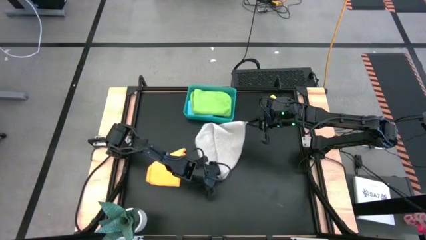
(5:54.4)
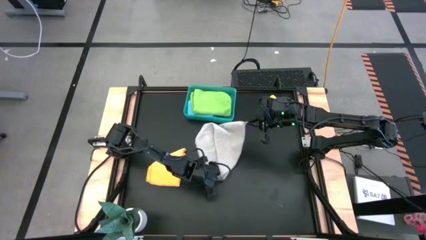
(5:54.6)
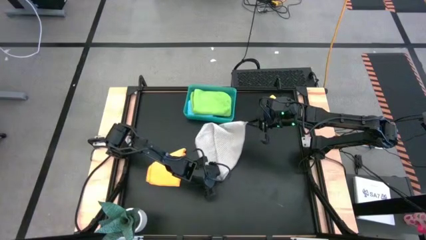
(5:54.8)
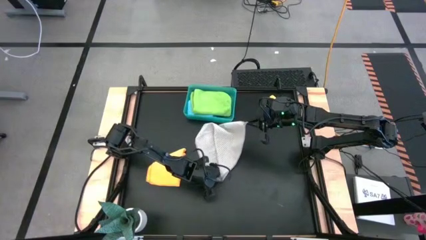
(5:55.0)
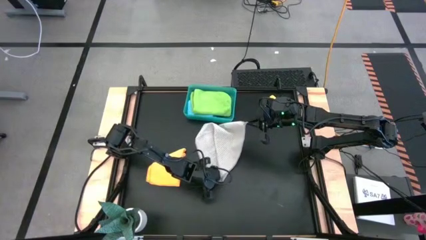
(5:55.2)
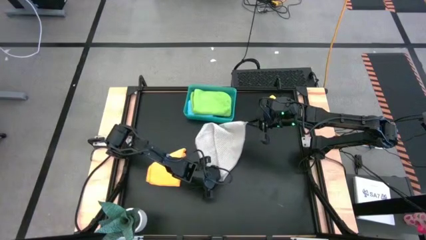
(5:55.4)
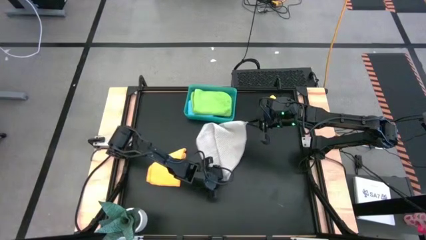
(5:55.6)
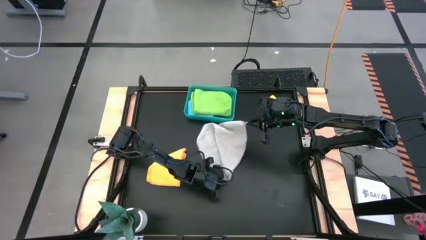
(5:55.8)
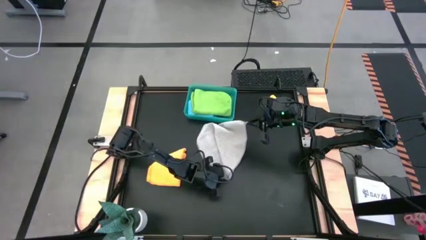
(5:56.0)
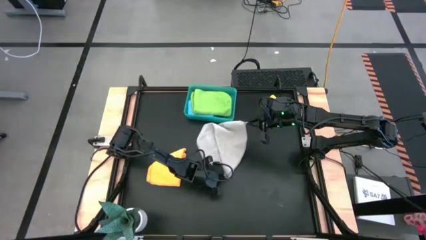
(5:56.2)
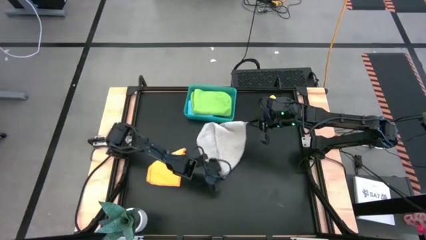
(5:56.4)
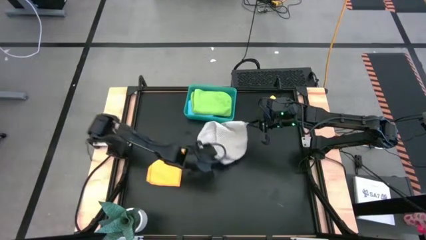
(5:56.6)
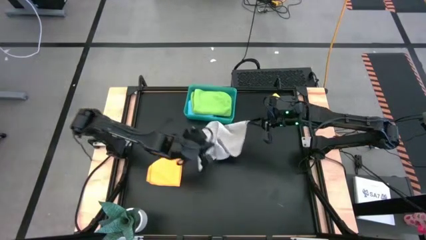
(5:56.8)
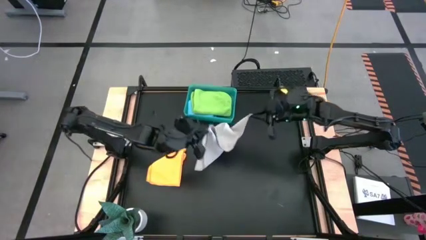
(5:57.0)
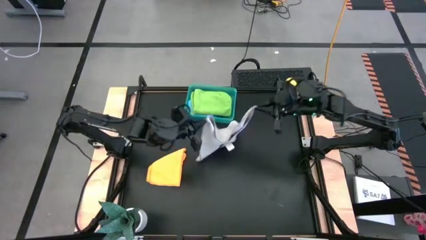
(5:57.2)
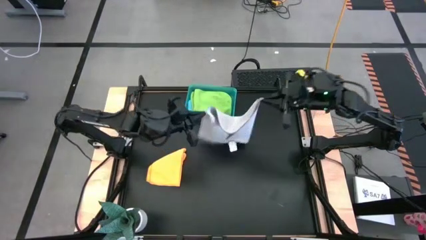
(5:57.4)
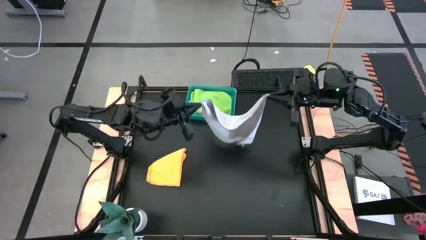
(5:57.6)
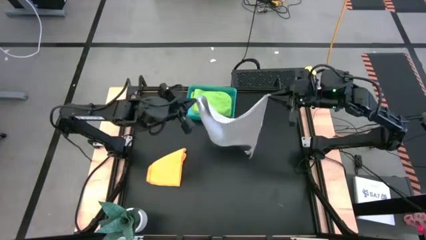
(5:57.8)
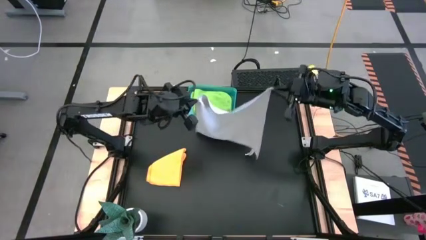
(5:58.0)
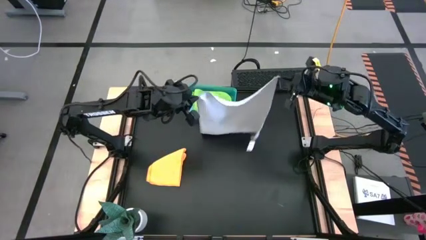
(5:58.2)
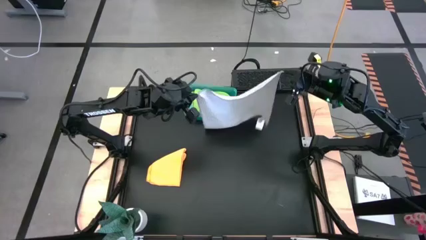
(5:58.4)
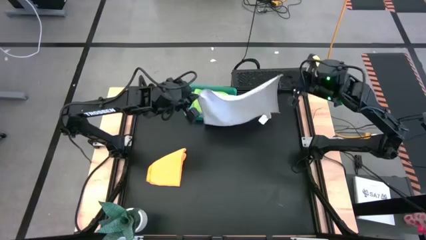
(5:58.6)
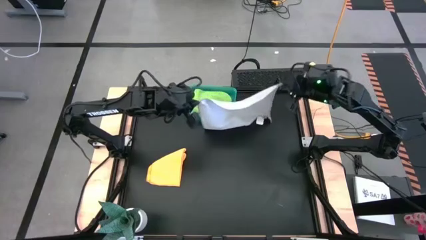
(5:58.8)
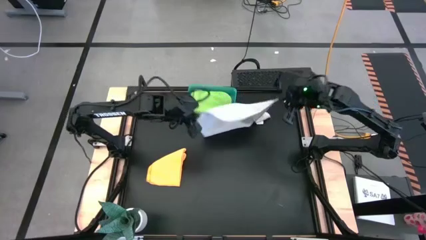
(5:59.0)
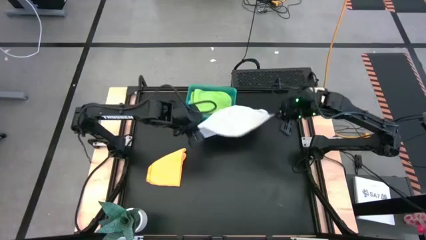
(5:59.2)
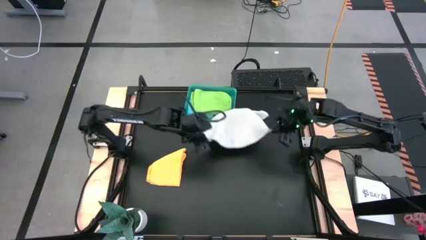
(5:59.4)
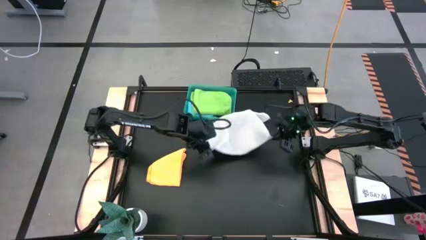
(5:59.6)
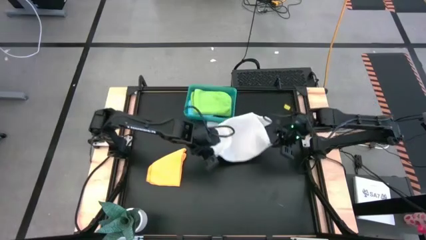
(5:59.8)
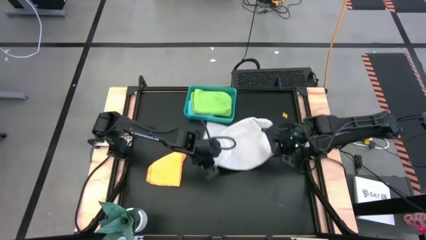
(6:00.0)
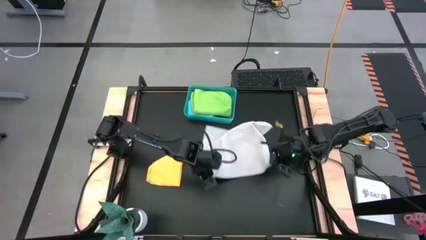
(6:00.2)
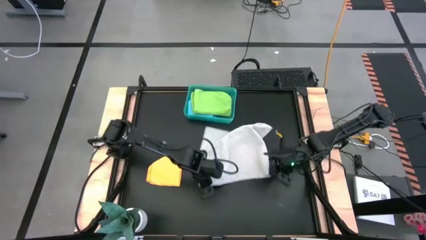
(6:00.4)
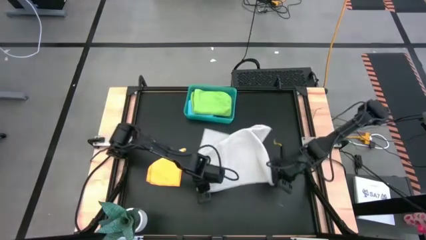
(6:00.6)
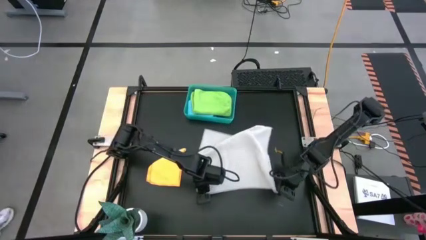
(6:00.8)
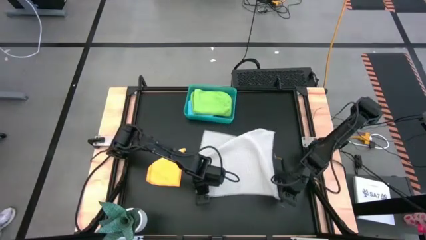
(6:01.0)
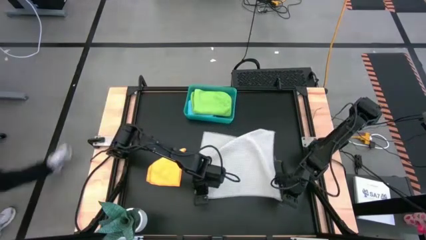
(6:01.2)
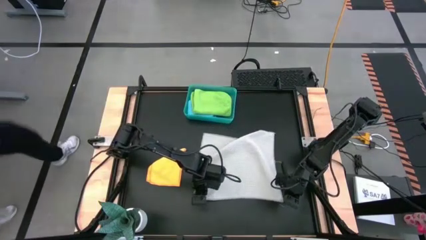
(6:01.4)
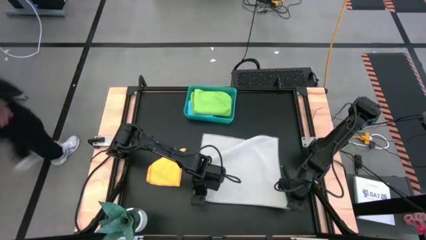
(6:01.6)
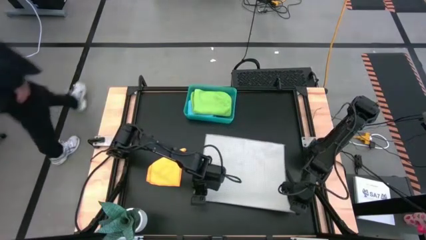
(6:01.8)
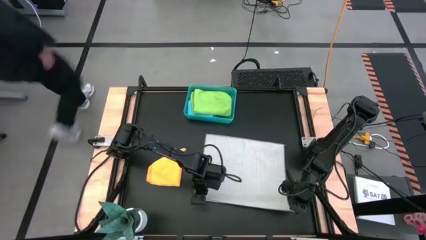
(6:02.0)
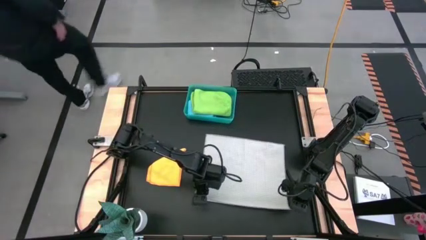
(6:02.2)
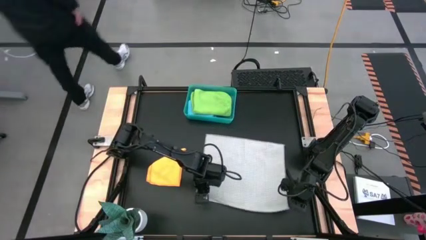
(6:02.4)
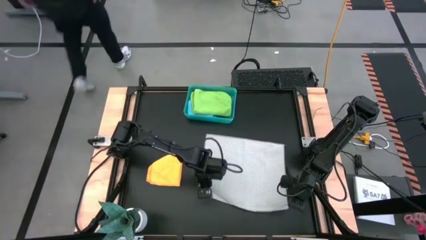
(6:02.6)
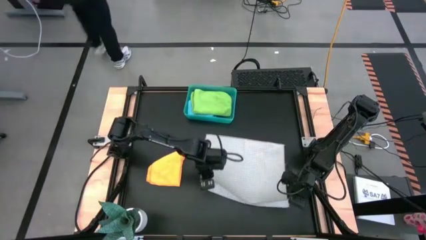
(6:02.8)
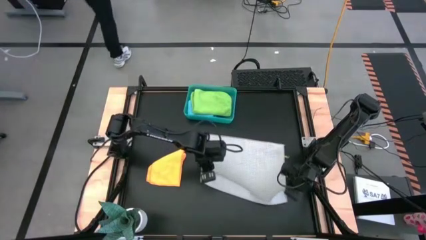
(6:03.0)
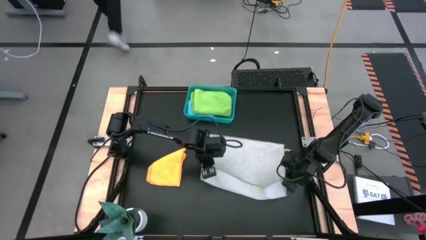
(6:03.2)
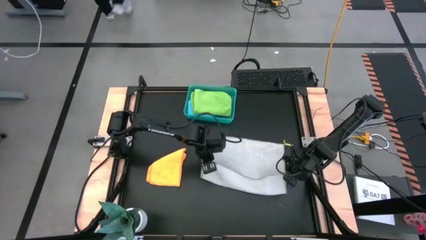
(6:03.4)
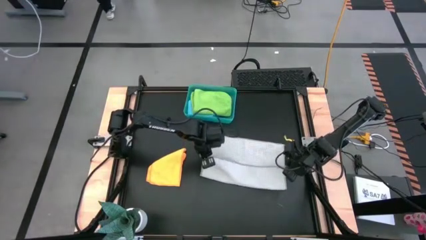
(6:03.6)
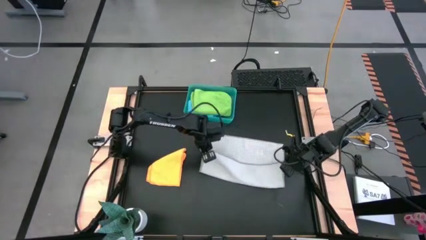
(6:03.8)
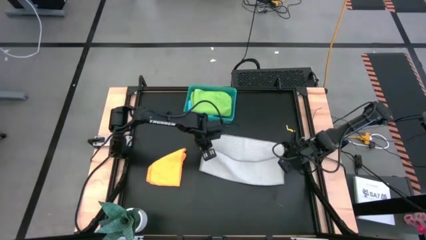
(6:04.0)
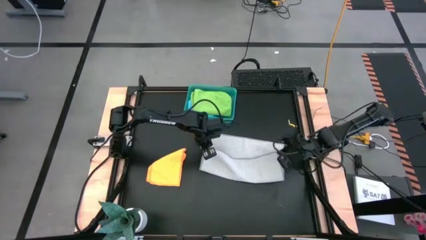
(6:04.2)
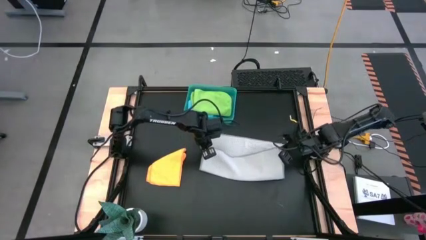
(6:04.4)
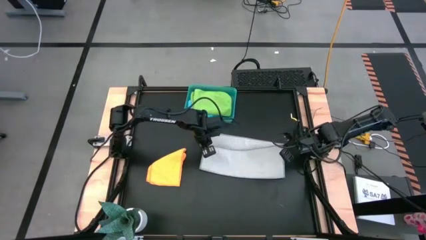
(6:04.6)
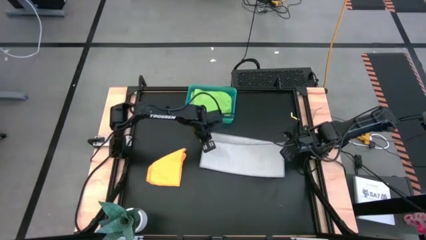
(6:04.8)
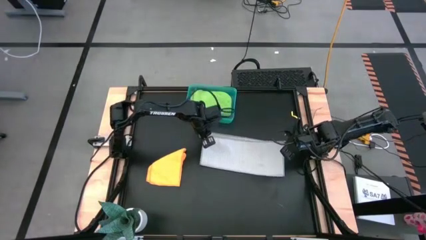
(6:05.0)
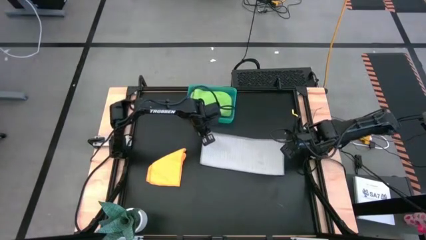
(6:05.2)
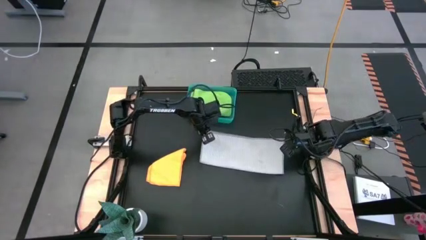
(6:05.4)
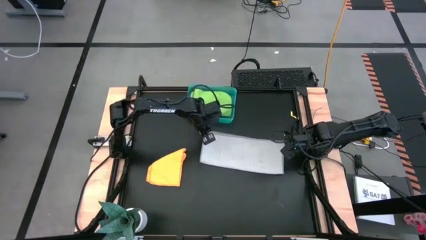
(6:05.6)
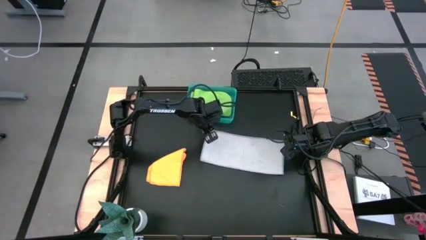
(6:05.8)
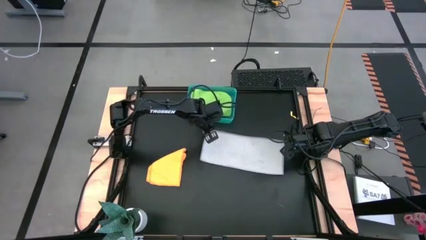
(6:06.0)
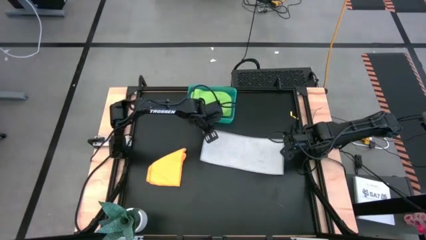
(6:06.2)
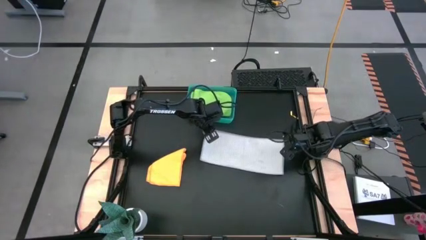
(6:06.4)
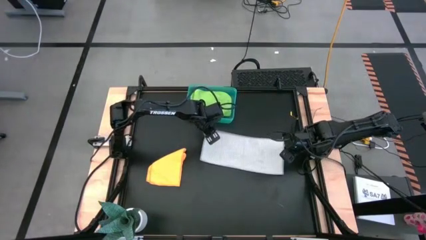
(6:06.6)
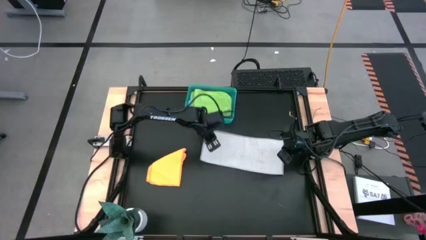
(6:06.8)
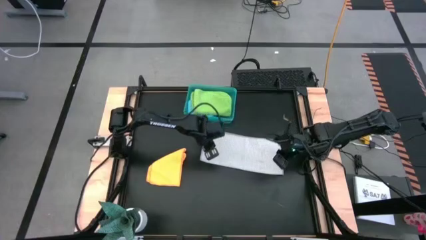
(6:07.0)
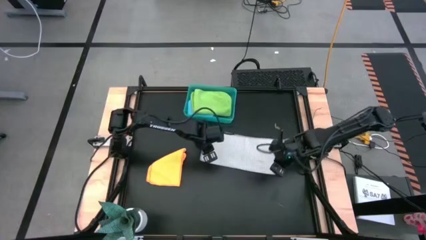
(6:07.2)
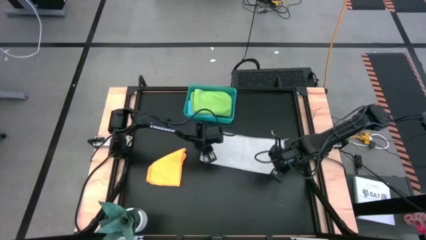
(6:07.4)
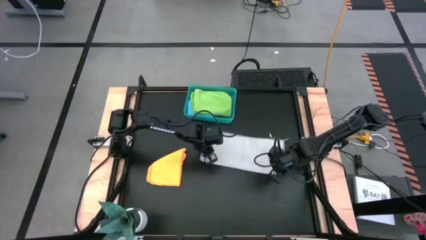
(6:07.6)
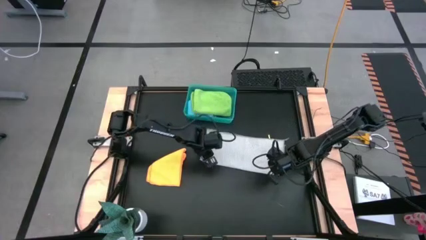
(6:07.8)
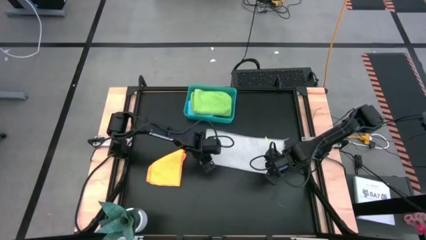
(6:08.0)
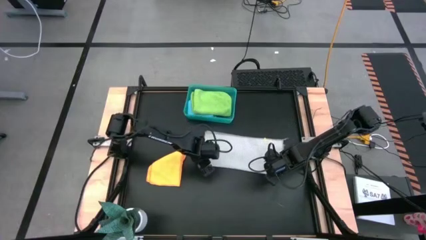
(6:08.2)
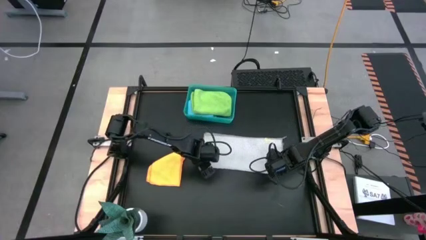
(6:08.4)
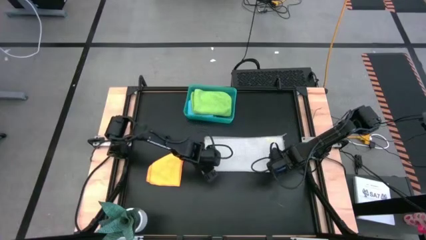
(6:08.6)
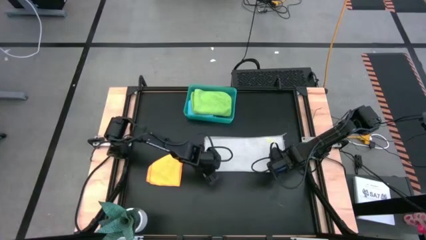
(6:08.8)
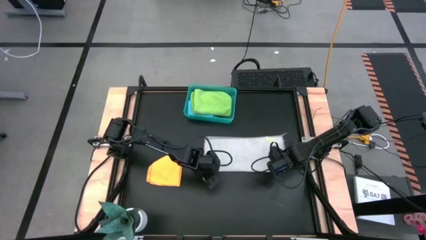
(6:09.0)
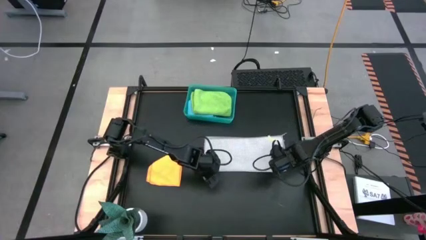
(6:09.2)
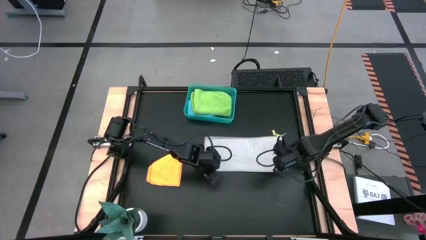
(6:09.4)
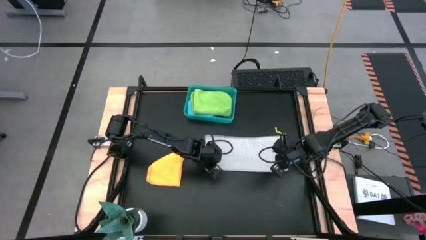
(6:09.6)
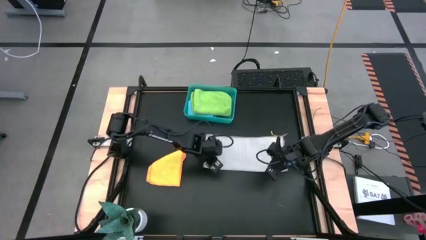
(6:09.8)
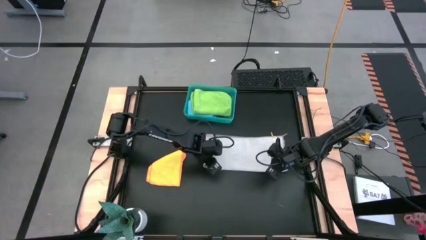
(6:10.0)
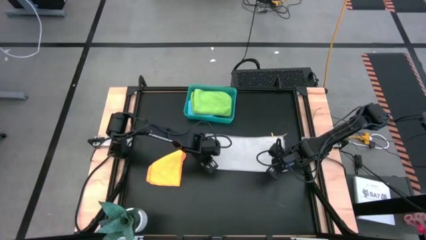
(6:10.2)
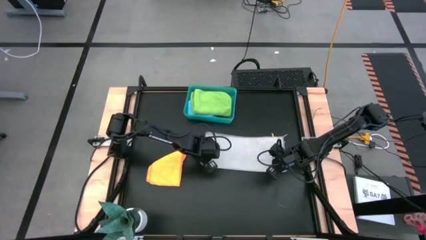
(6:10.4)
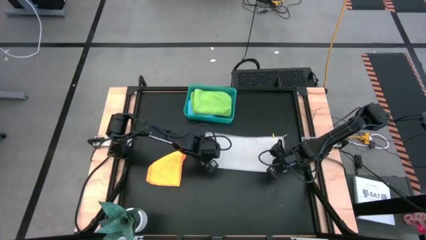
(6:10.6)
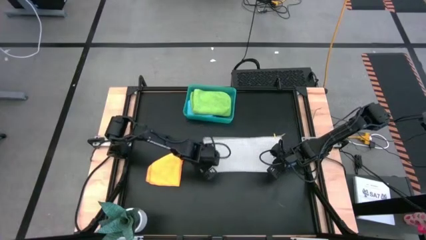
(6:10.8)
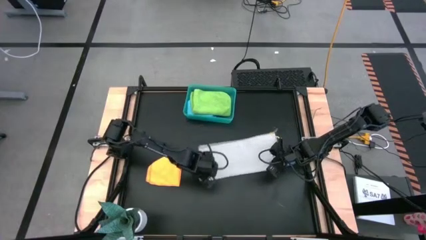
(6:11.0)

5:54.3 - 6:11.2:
Task: Fold microfiber towels
Fold the gray towel
